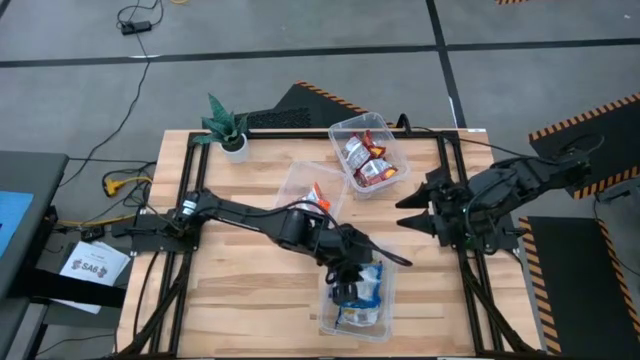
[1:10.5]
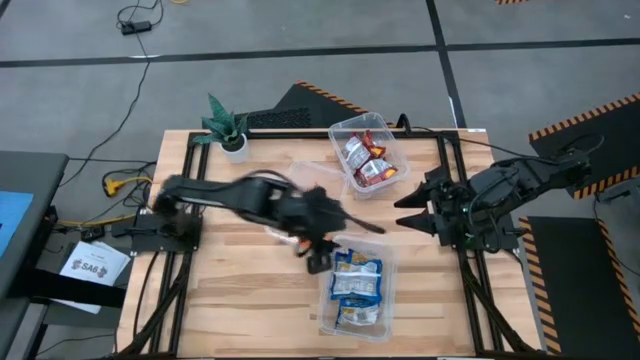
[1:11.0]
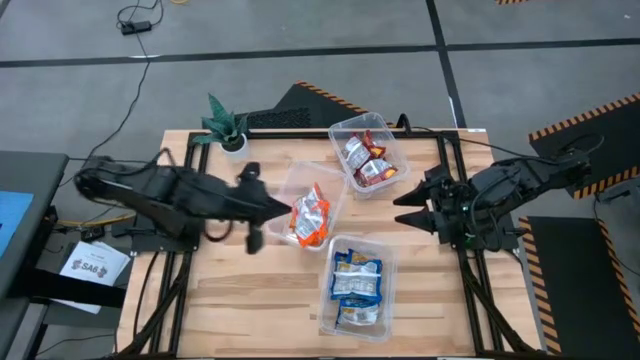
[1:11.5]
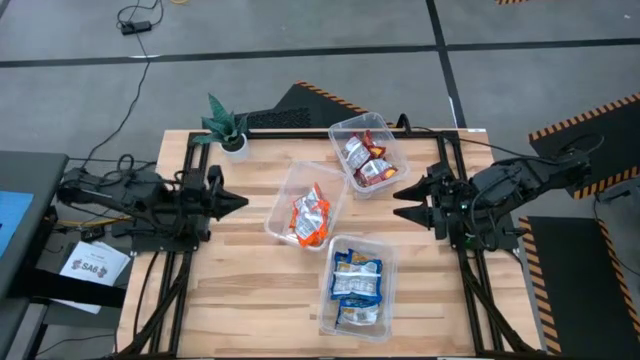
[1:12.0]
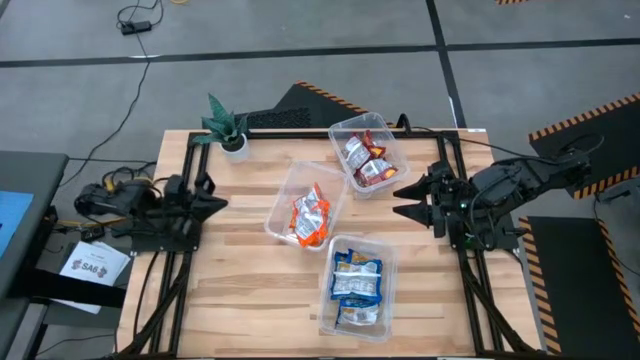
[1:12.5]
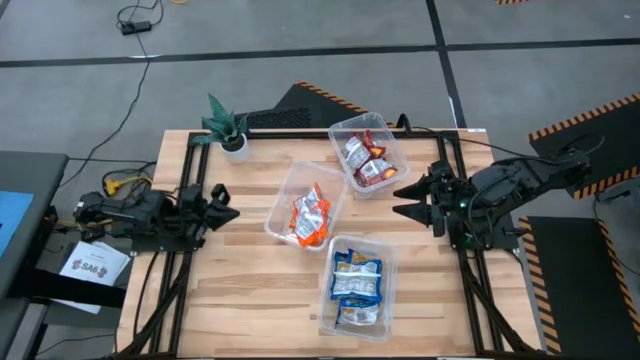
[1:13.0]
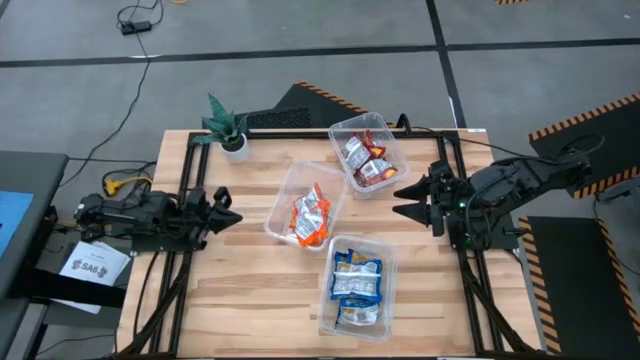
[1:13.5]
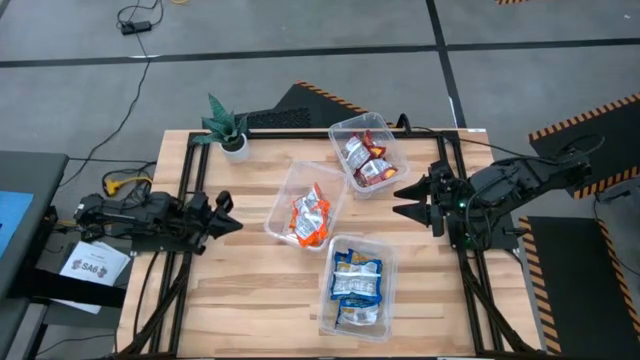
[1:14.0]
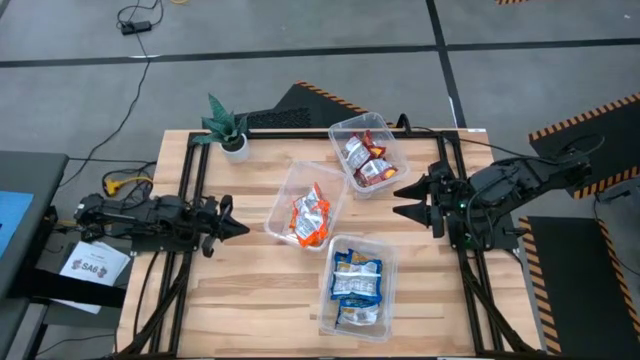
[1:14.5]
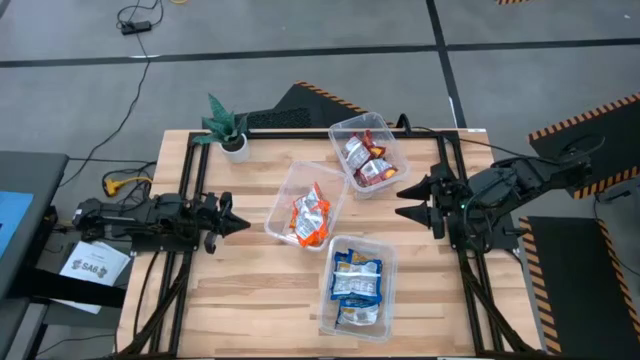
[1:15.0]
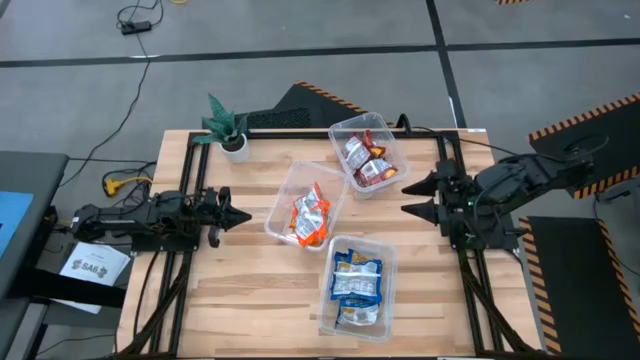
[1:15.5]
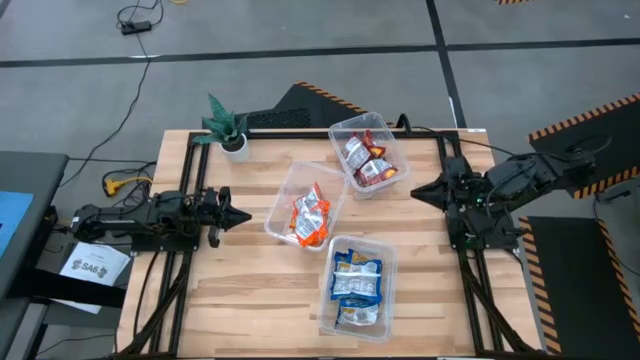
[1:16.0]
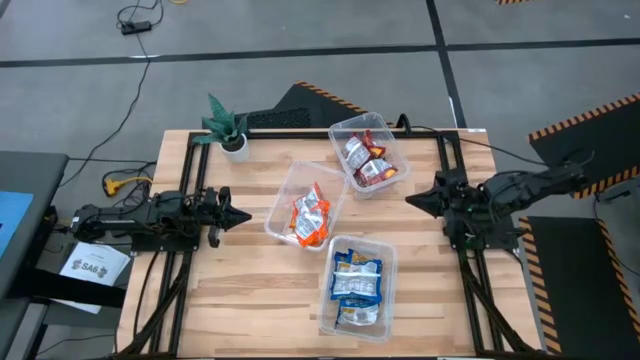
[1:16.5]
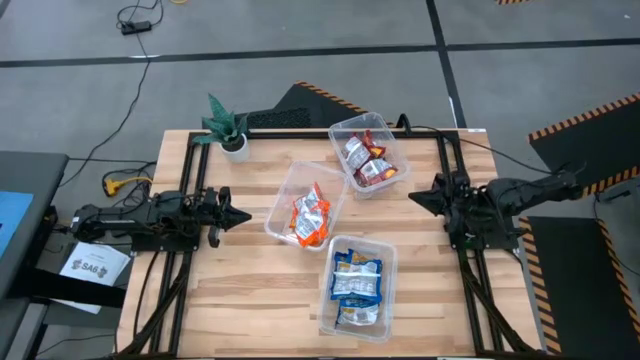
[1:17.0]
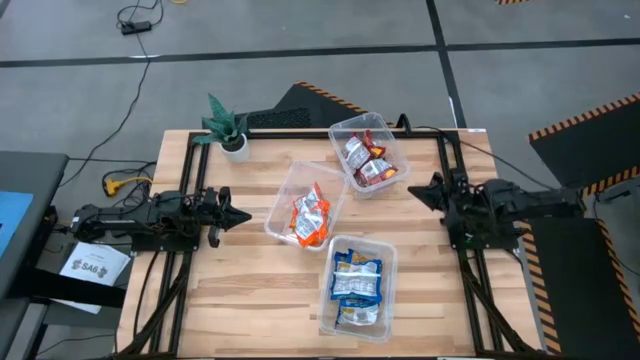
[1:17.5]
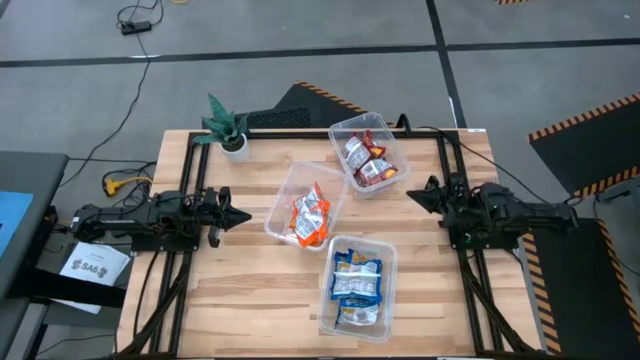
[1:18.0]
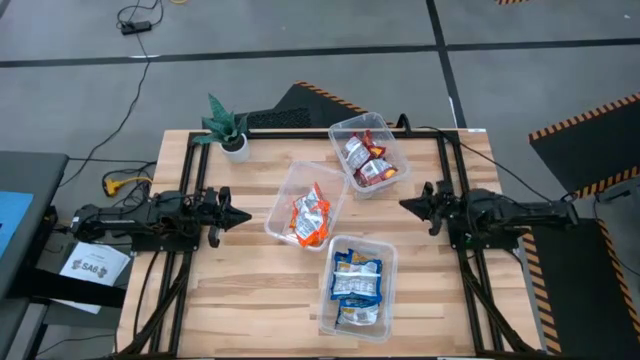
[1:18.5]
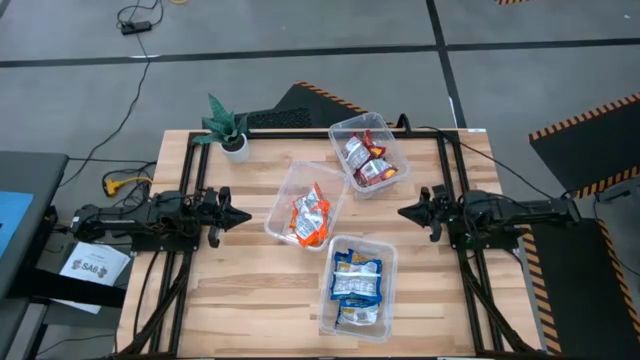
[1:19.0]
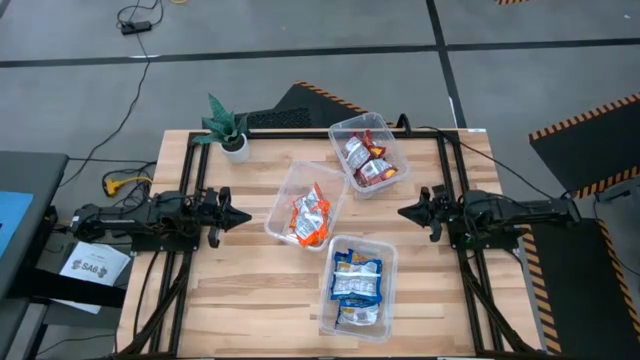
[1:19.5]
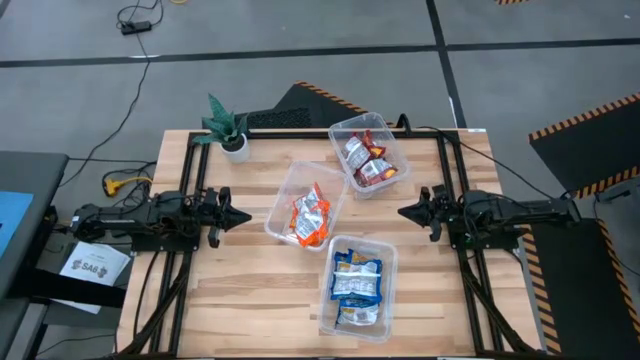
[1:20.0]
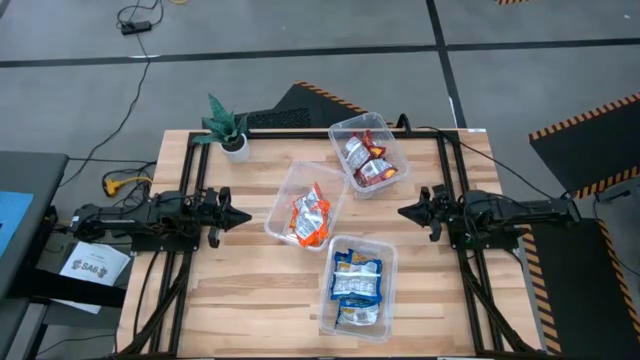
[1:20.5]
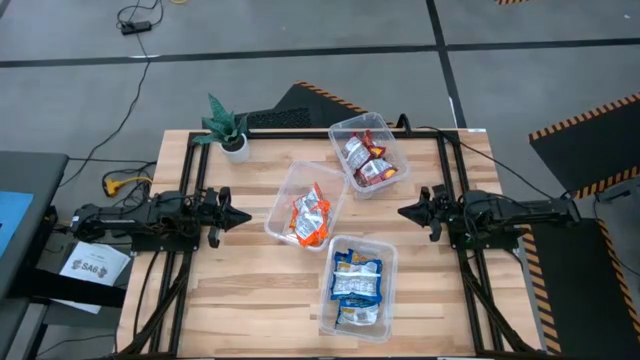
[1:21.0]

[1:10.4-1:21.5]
Task: Sort Maruchan noodles
Return to Home Position

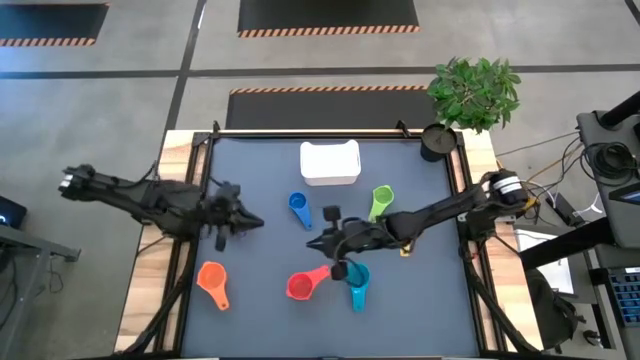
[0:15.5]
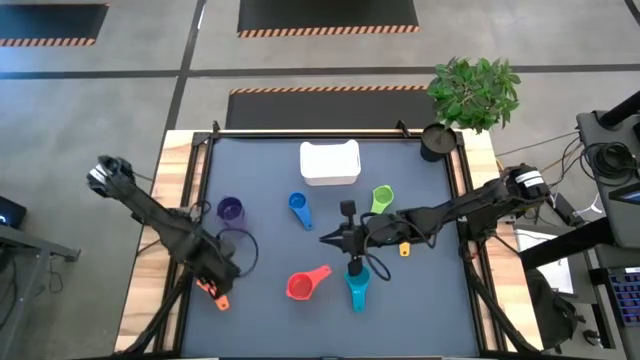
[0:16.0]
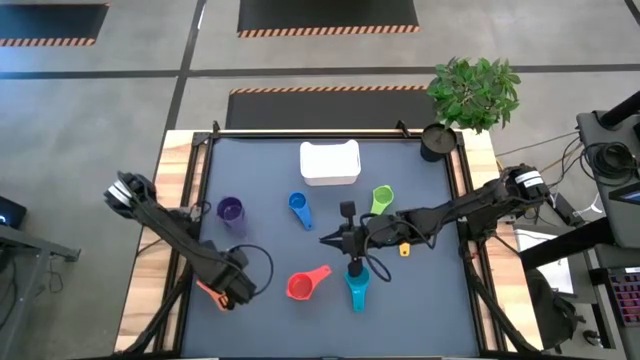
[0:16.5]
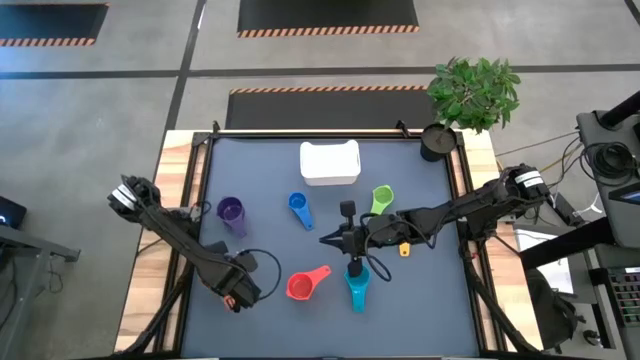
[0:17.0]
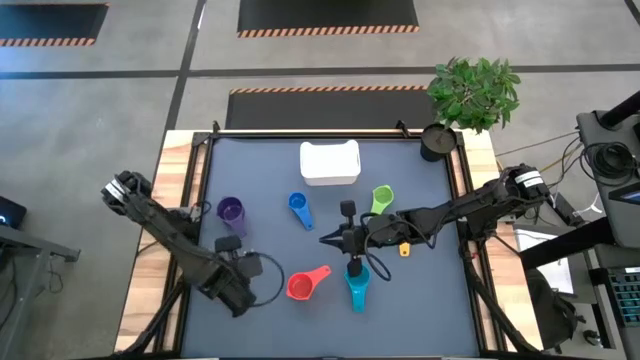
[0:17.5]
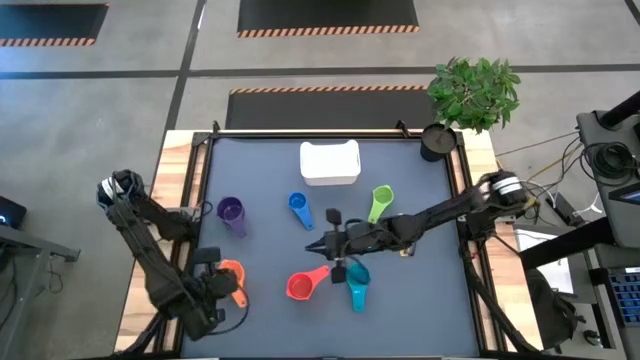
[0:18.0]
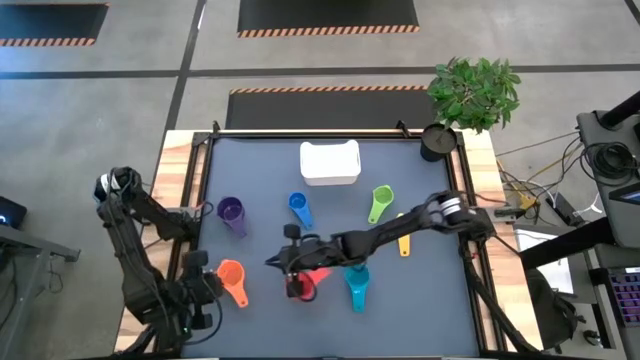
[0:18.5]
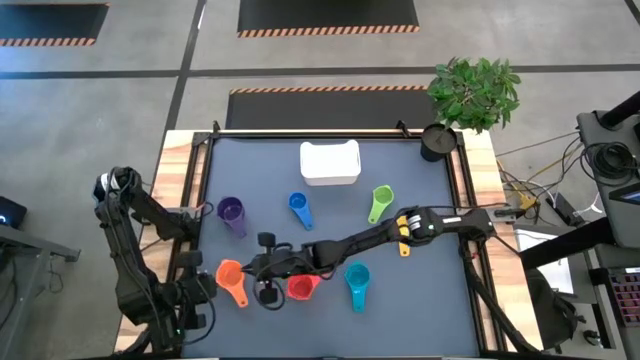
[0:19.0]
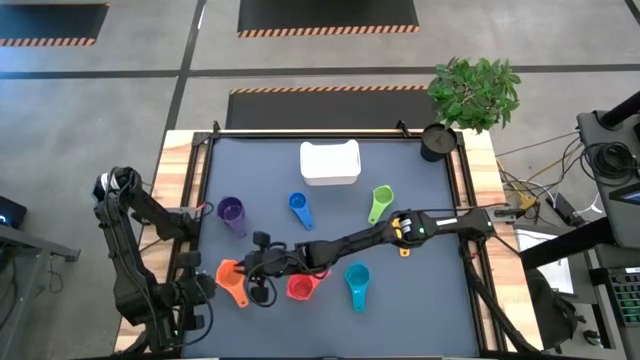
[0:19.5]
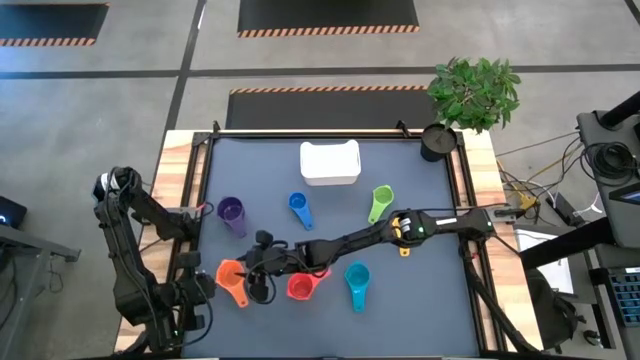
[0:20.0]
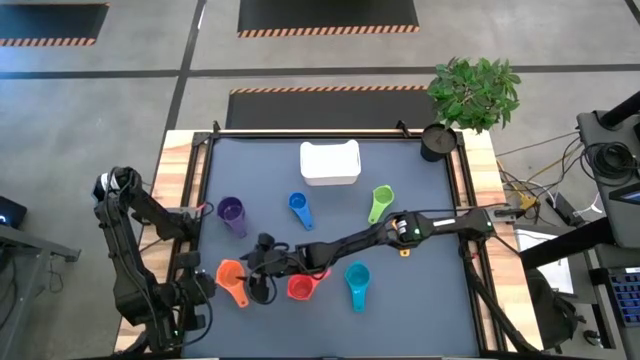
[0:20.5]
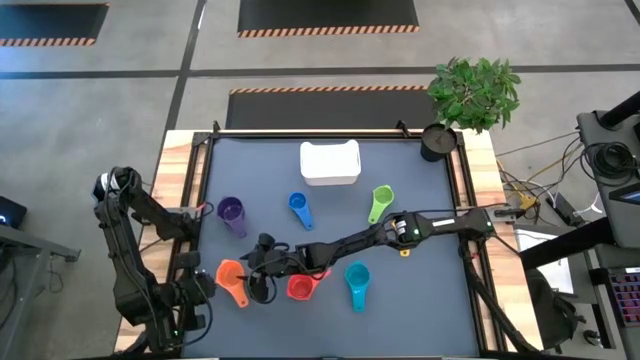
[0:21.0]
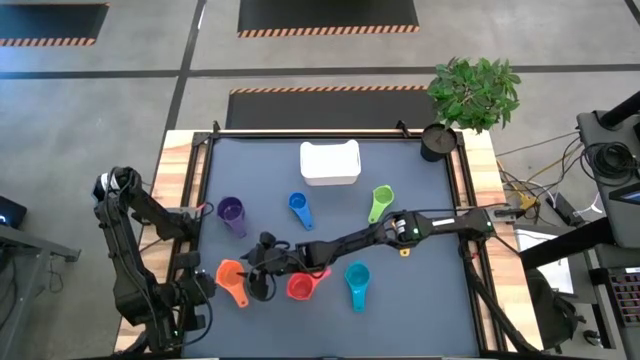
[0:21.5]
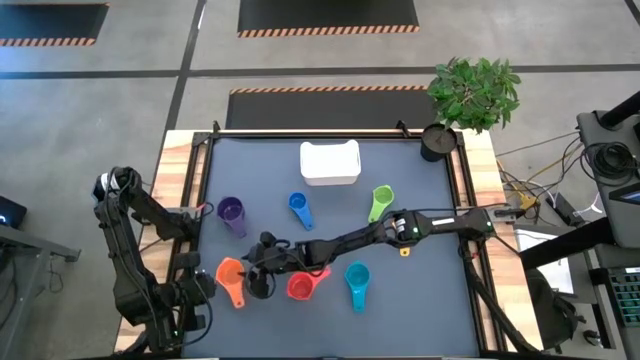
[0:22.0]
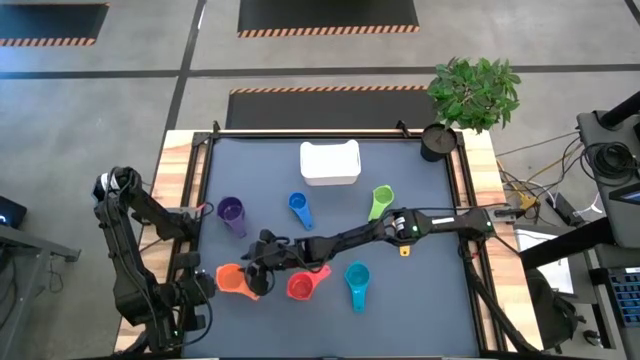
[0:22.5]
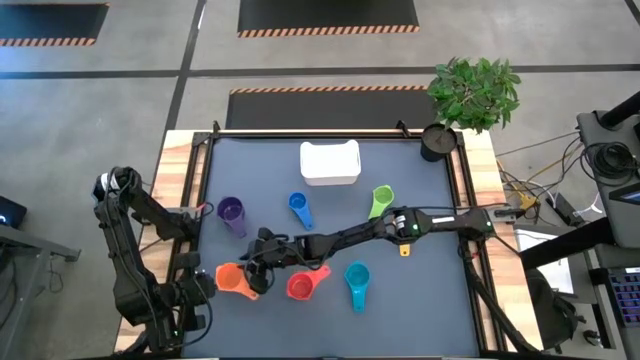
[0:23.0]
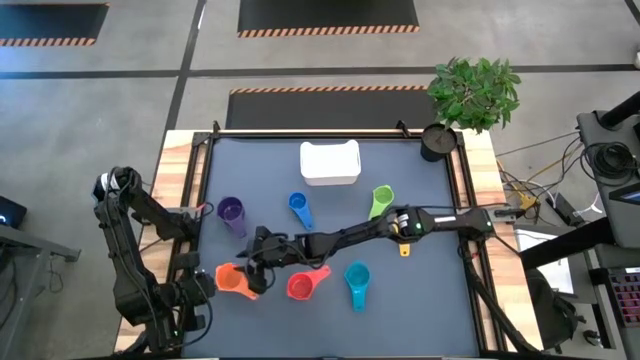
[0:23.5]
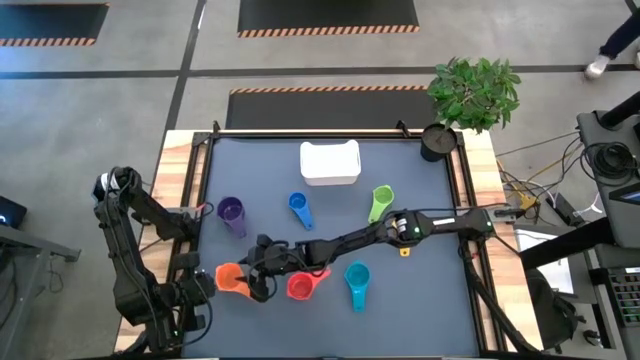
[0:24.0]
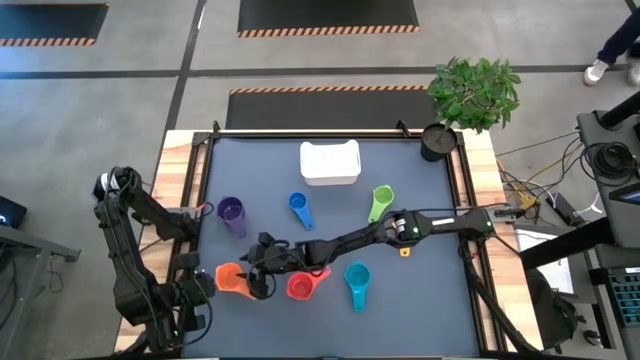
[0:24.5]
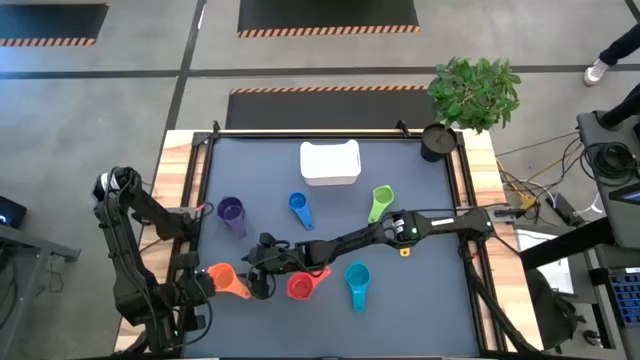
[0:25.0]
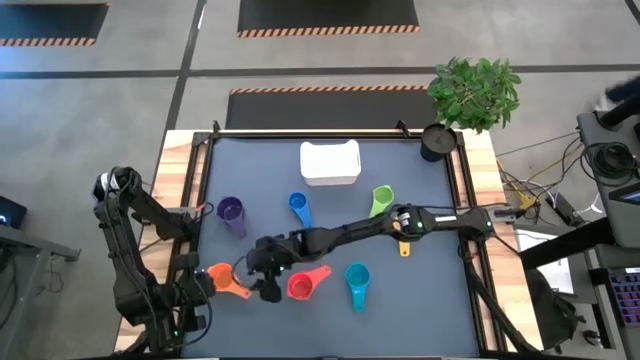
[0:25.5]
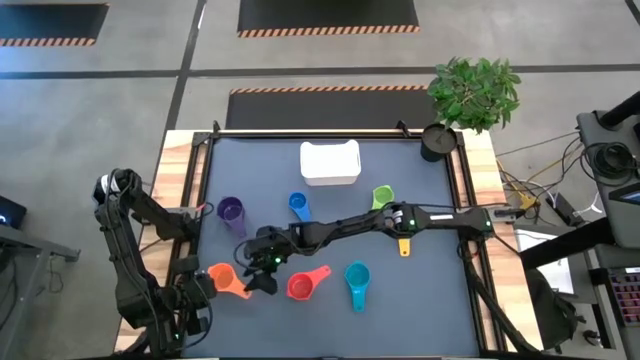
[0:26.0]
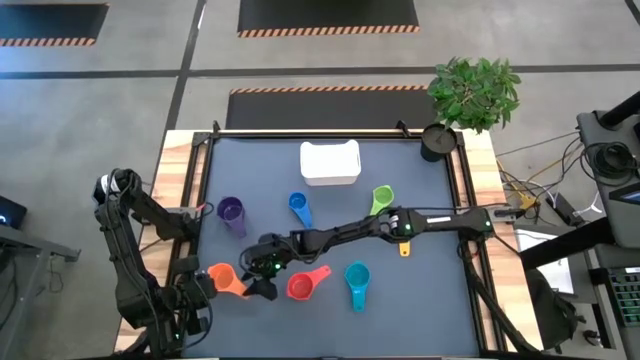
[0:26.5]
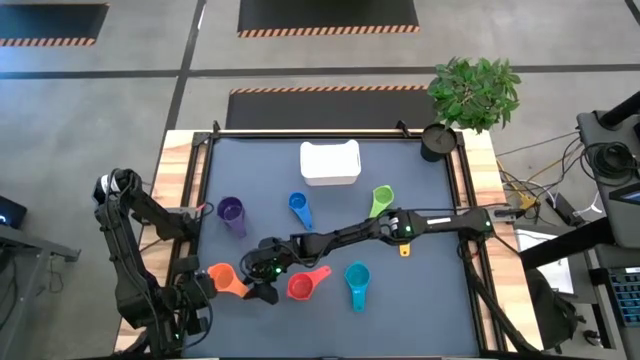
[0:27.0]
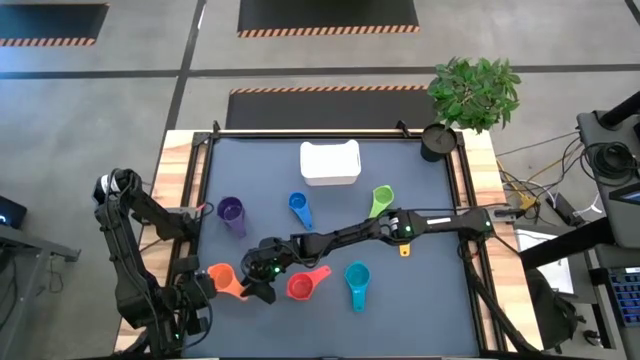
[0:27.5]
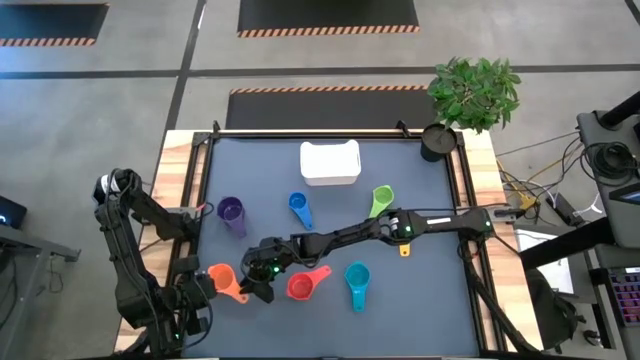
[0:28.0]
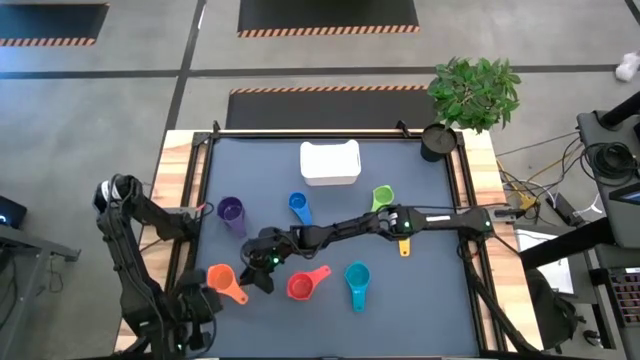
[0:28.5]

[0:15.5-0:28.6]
Task: Nest measuring cups in basket
Stack the orange measuring cup on top of the purple measuring cup
